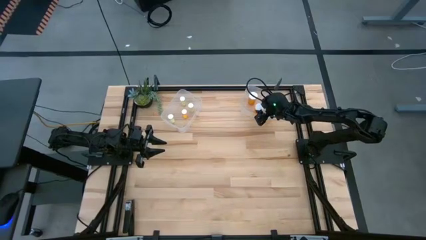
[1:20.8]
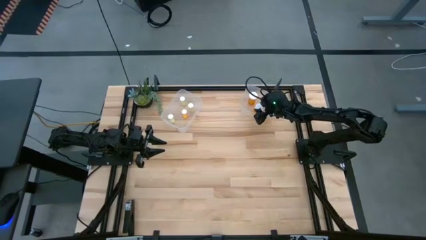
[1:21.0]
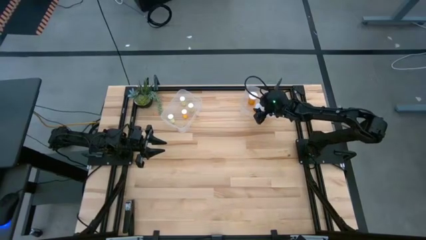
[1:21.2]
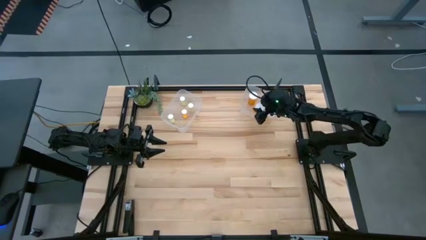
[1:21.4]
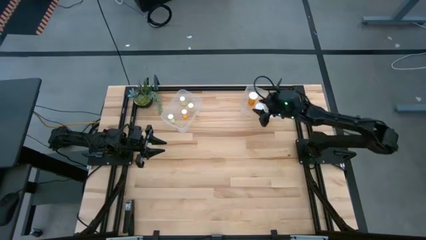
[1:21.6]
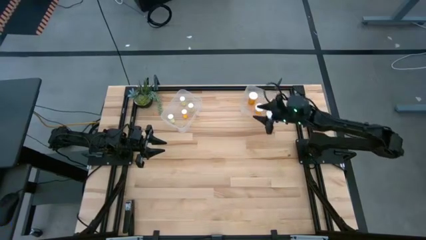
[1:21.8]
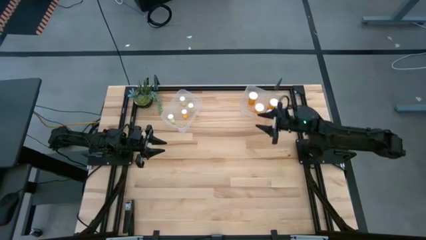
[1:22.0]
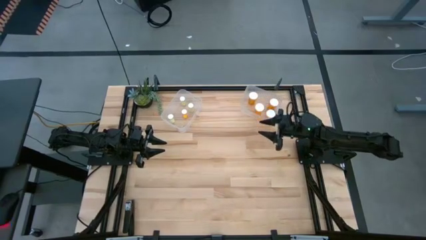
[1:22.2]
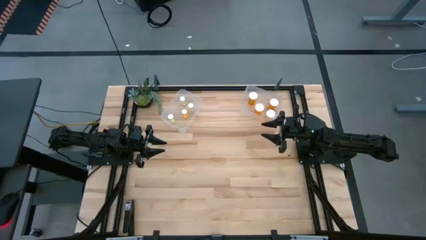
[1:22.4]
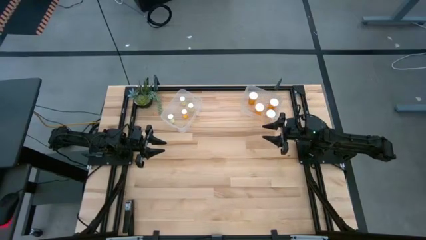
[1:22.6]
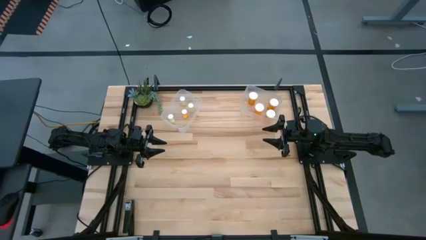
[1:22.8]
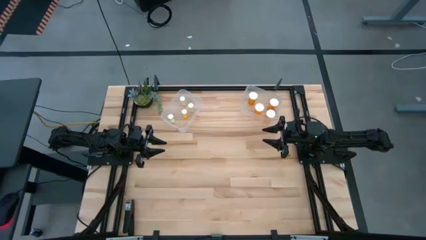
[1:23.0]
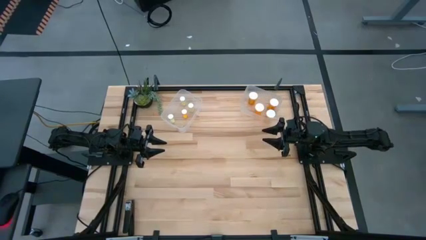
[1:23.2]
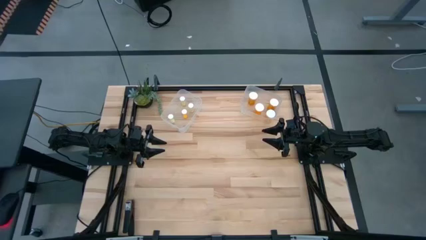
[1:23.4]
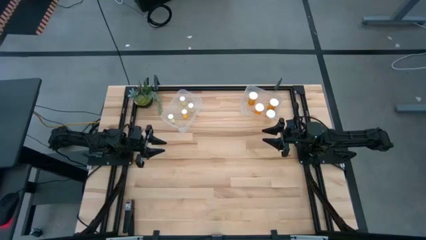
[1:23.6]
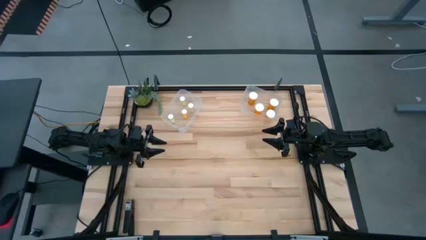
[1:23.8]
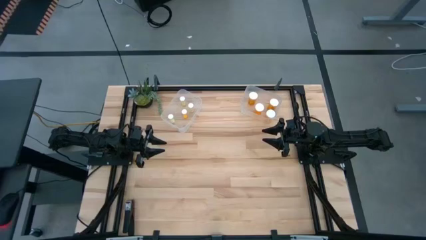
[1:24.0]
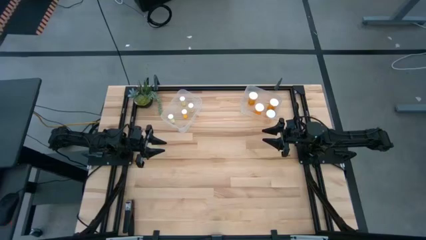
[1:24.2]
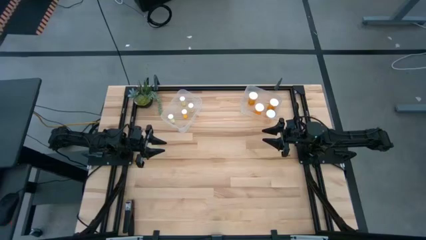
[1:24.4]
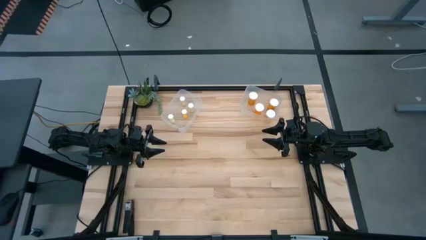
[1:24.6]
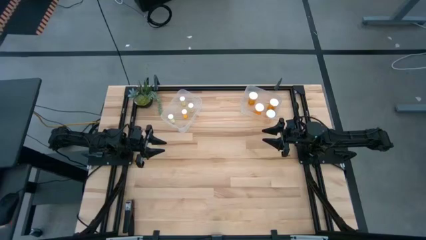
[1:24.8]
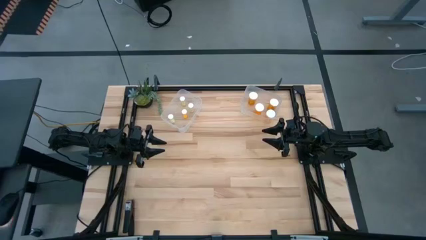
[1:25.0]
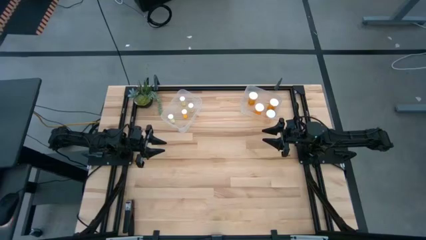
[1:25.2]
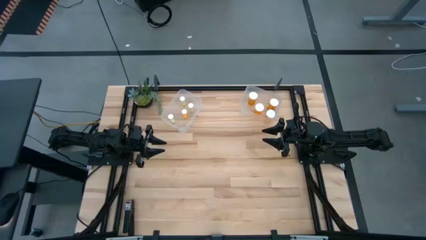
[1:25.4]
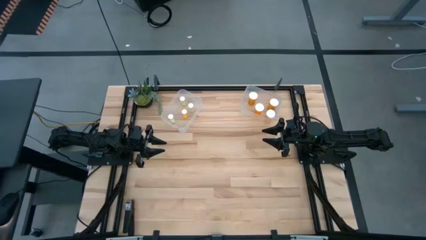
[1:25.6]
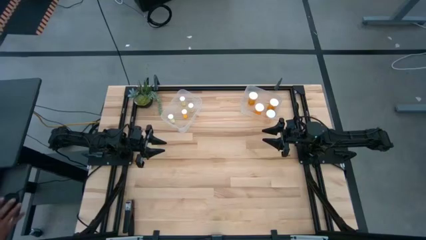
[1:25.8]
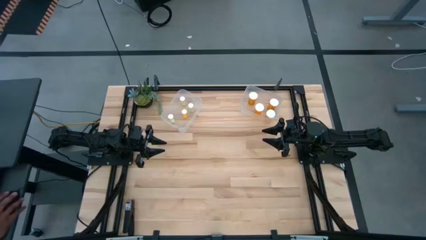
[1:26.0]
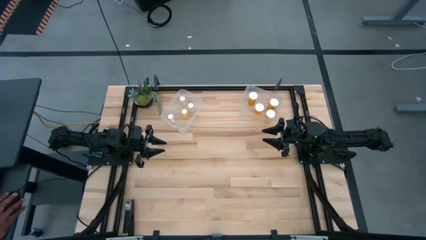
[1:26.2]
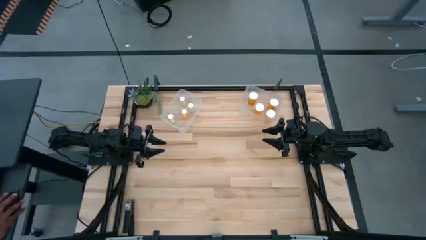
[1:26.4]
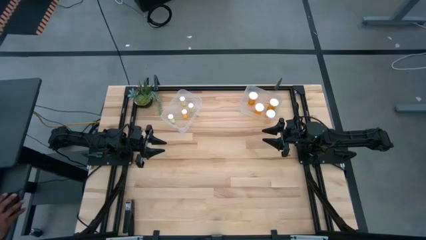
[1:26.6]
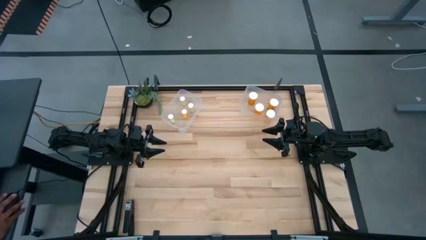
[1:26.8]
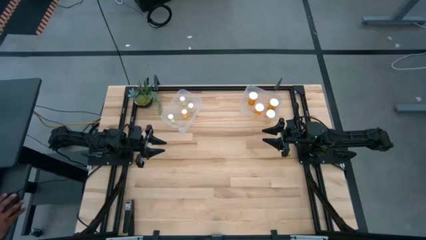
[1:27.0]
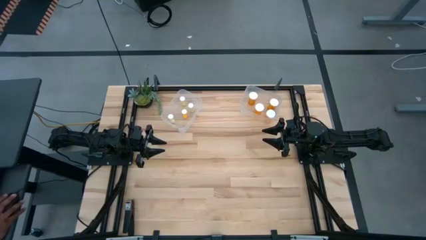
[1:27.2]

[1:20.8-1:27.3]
Task: Pick and place medicine bottles into bin by pill shape (circle, oval)
Return to Home Position

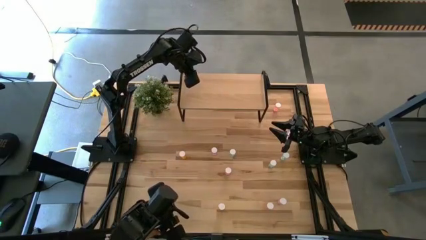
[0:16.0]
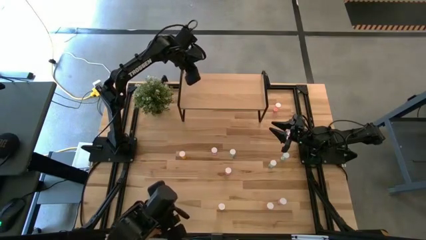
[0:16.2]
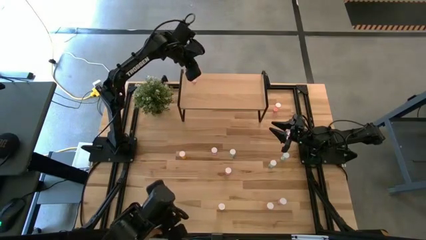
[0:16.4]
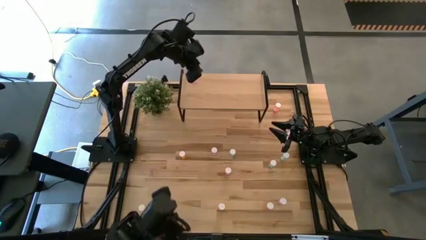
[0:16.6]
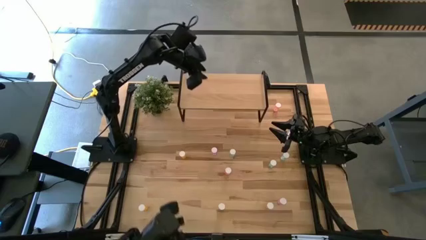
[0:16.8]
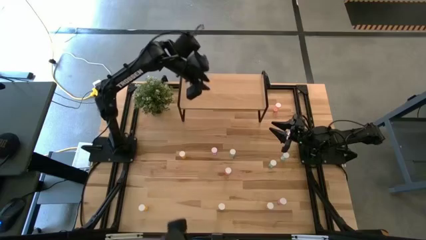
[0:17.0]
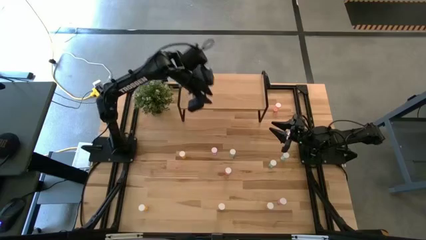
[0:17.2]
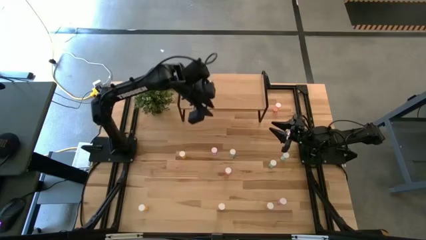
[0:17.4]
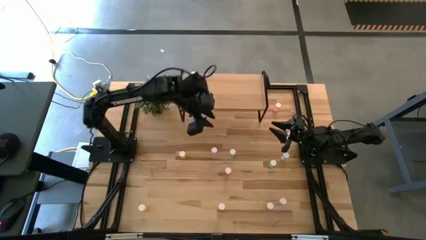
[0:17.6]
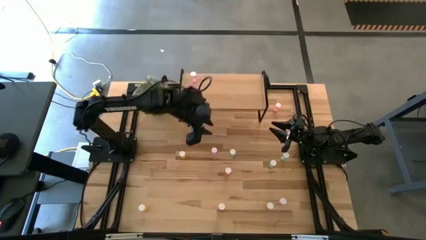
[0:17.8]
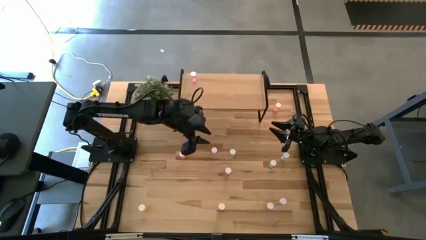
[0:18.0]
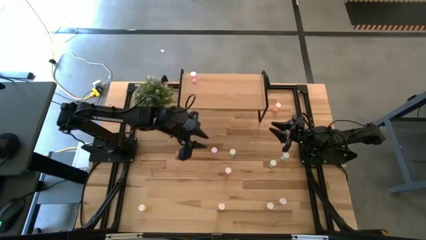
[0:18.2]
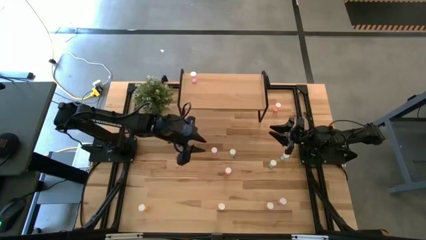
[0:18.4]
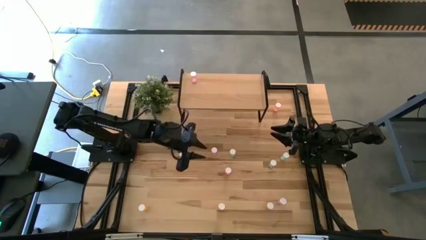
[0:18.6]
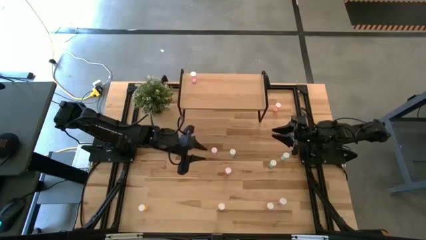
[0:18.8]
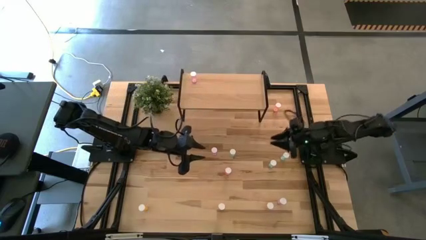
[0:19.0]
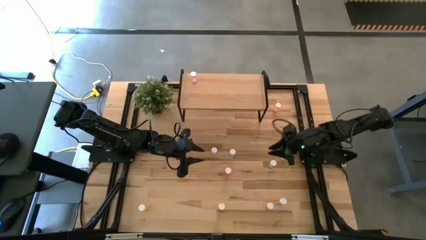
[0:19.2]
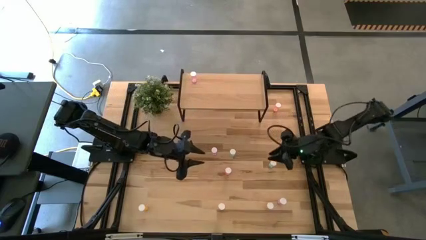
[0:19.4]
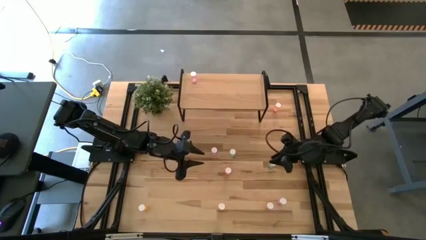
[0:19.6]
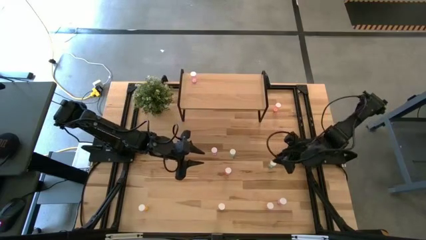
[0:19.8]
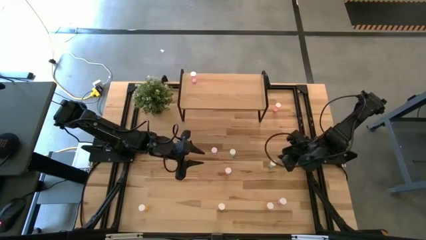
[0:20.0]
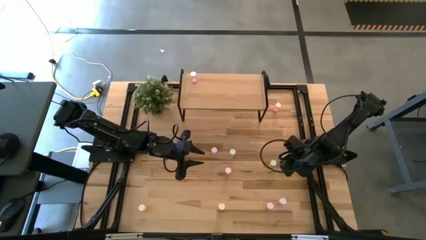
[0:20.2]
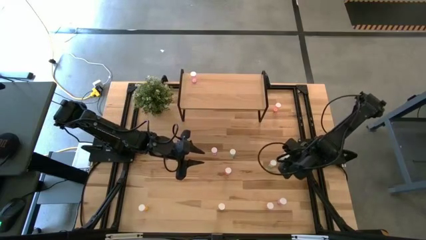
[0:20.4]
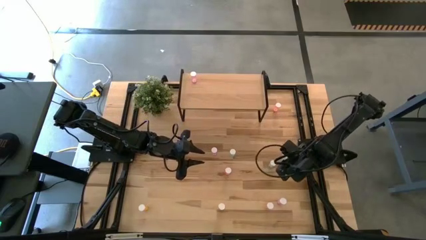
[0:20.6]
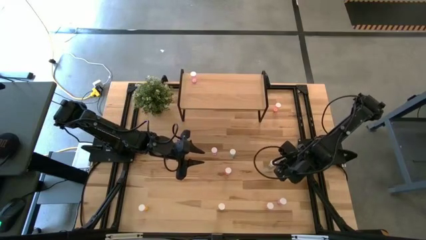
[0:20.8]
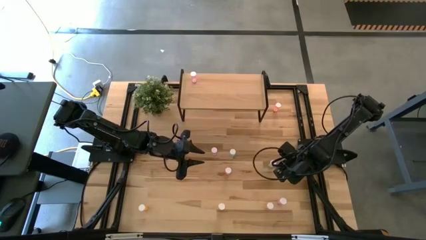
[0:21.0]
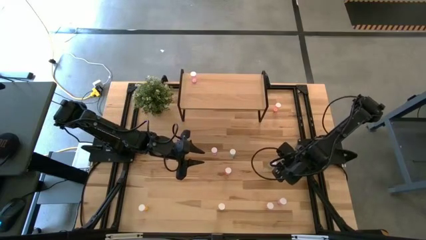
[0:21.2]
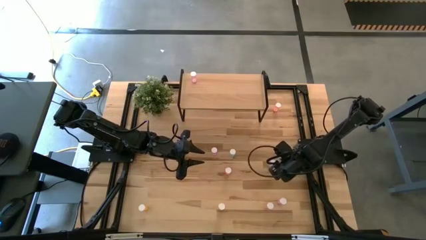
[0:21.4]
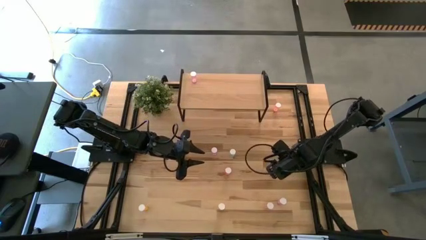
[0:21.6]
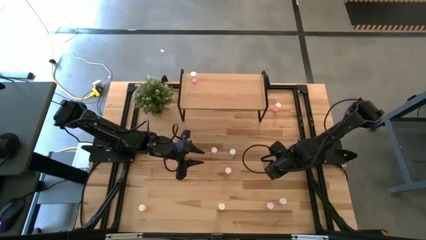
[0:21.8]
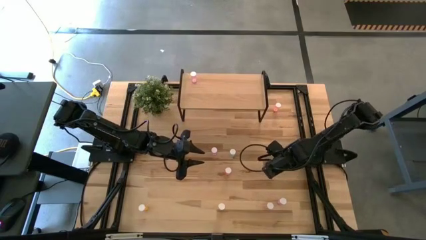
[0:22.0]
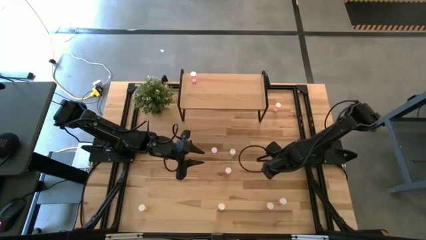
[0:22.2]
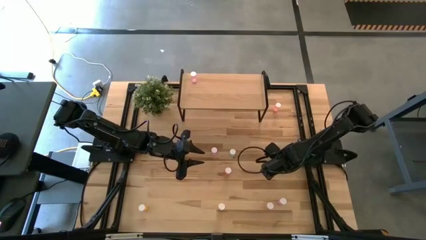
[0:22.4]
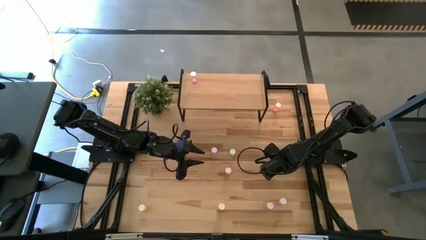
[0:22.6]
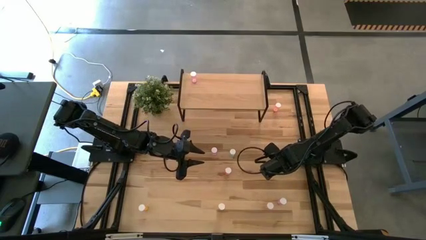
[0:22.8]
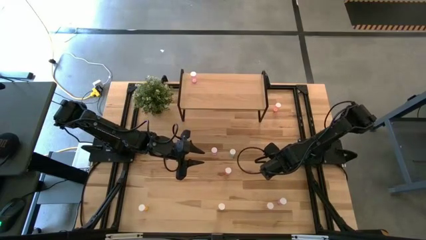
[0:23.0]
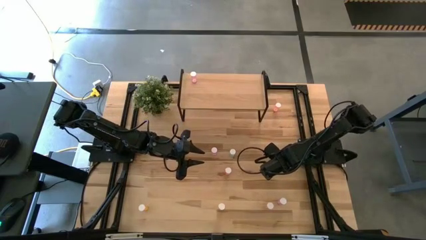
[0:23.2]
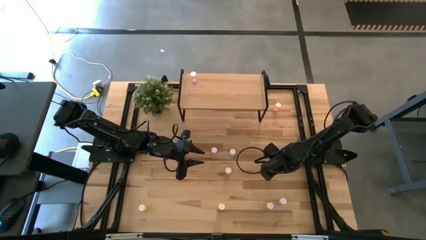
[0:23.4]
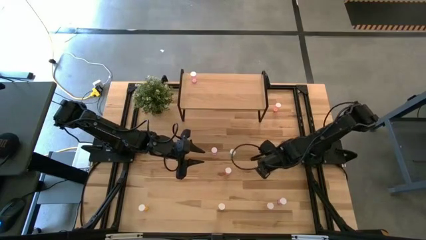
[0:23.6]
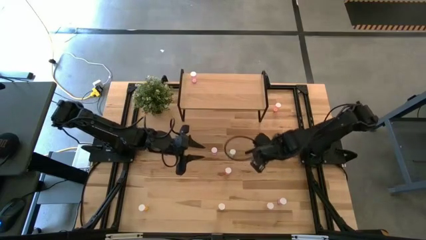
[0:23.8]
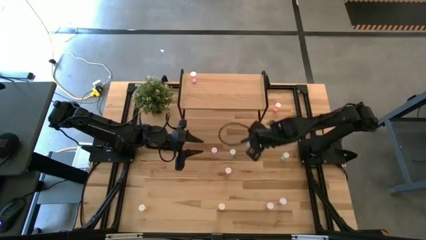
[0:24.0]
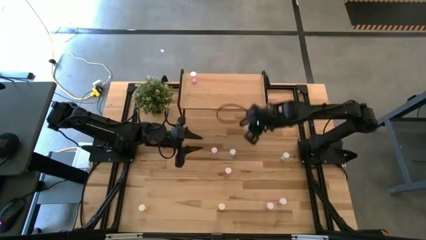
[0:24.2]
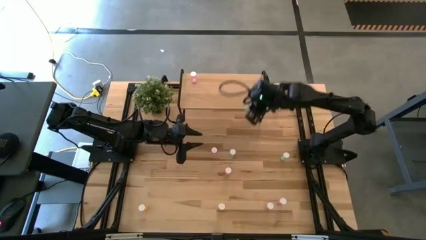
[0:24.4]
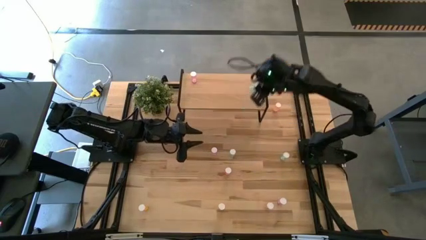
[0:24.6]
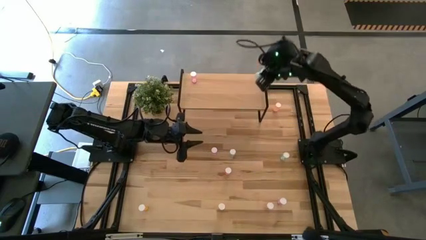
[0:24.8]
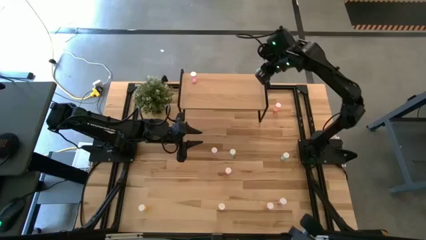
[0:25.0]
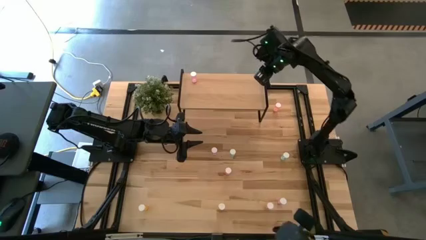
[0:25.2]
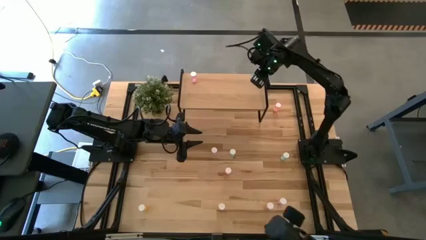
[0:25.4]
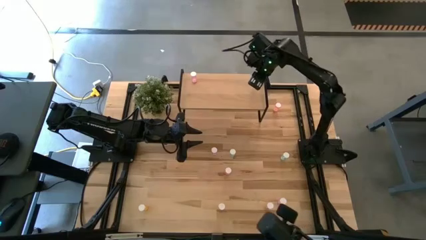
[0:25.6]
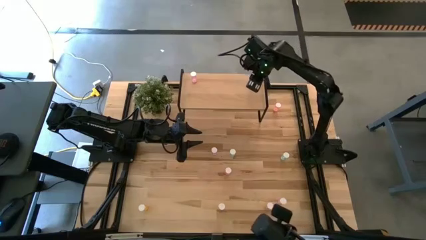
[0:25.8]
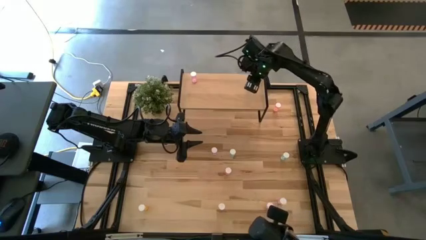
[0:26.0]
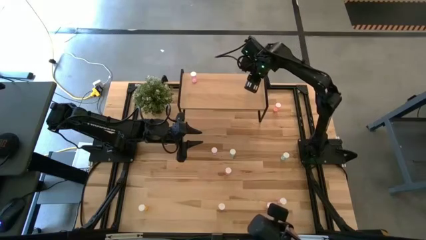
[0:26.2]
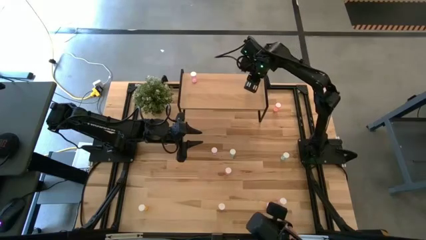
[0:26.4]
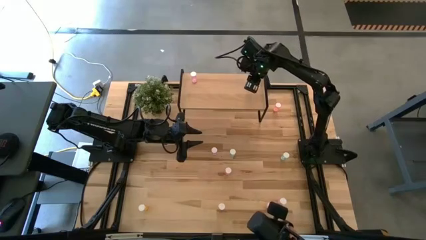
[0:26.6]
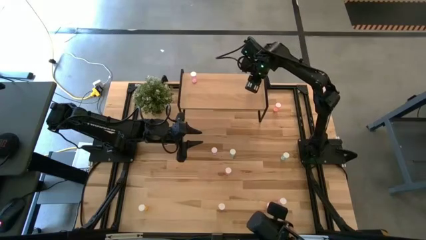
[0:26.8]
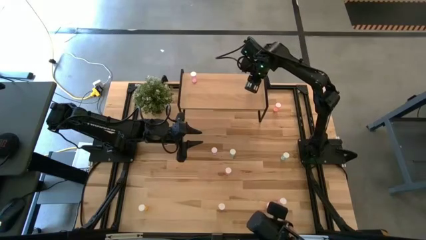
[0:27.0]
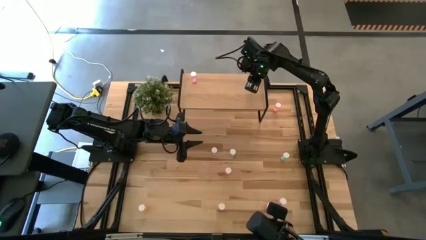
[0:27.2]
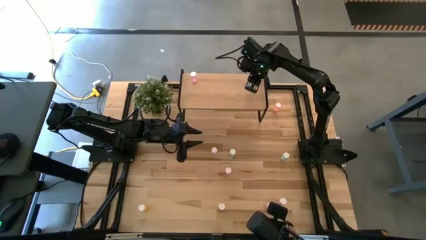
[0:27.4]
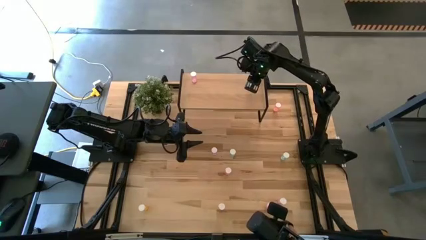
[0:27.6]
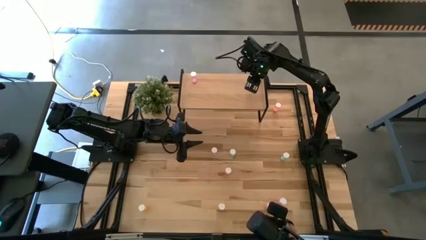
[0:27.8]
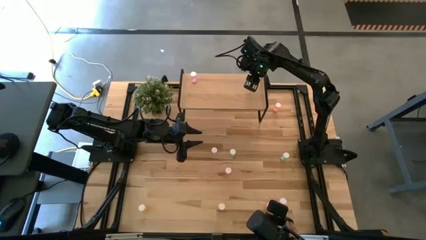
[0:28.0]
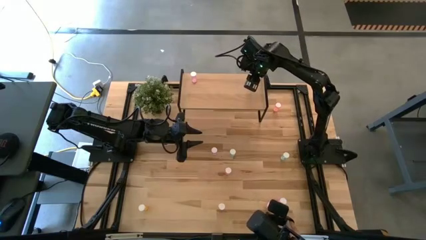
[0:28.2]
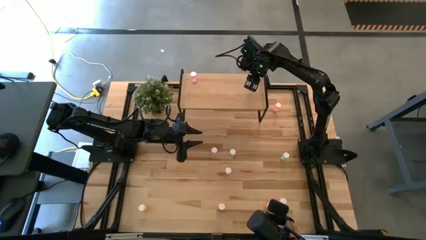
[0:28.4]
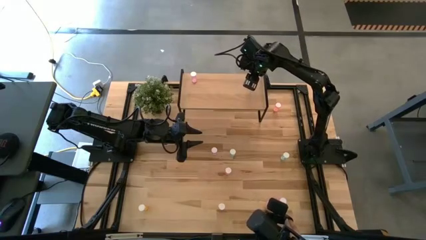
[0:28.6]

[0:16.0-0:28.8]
Task: Pick and place medicine bottles onto shelf by color
Put the middle blue pill bottle on the shelf
